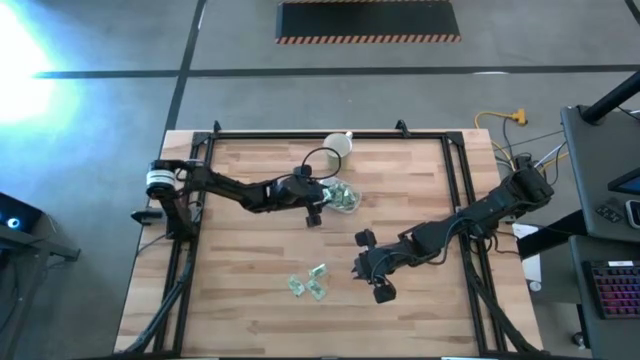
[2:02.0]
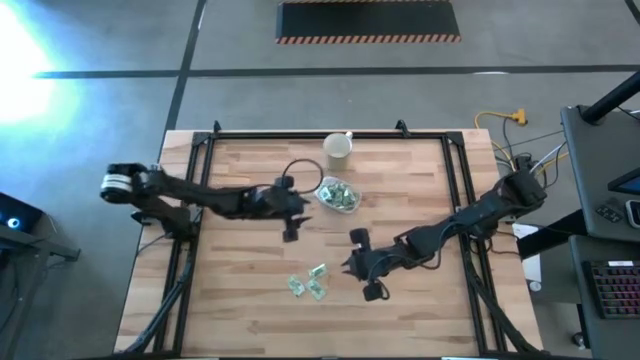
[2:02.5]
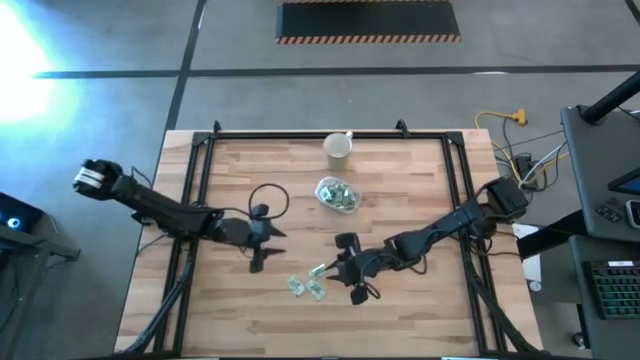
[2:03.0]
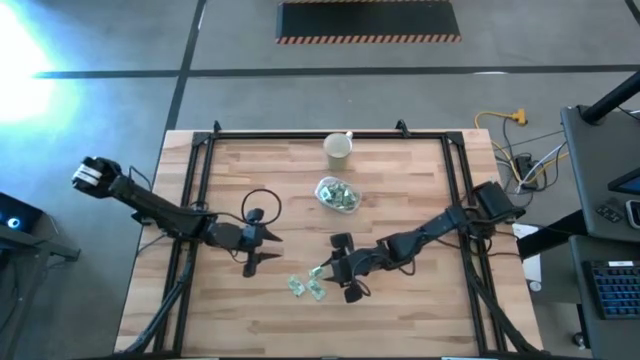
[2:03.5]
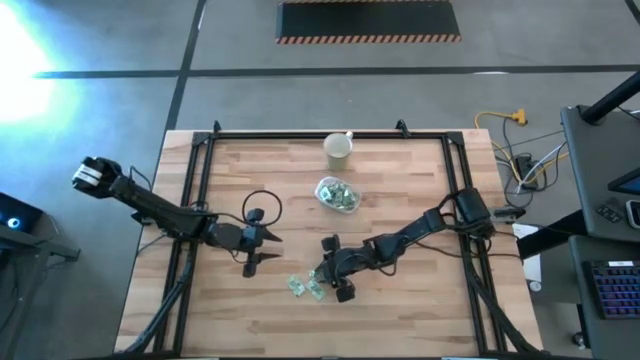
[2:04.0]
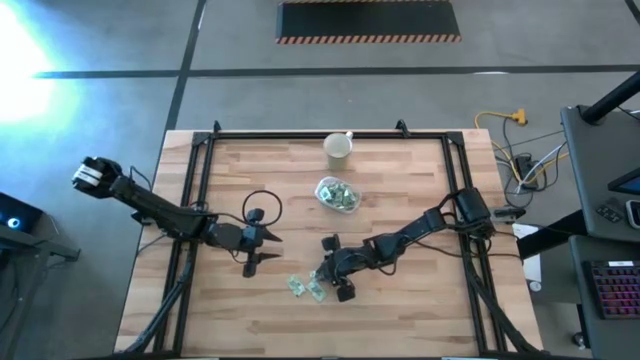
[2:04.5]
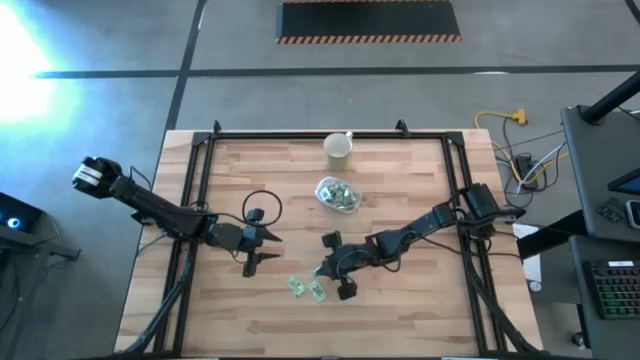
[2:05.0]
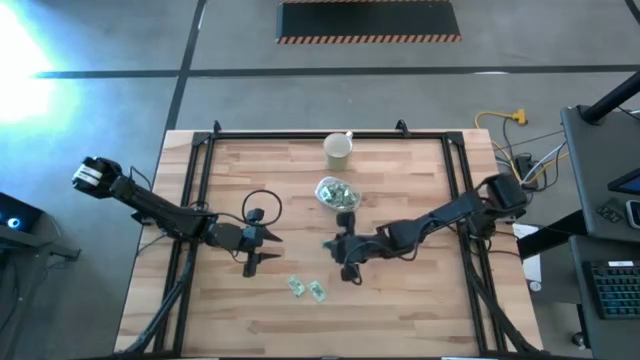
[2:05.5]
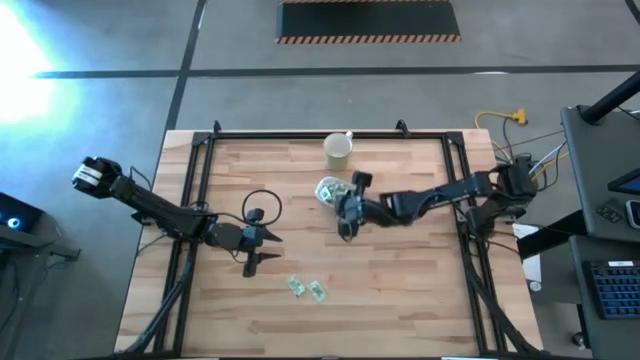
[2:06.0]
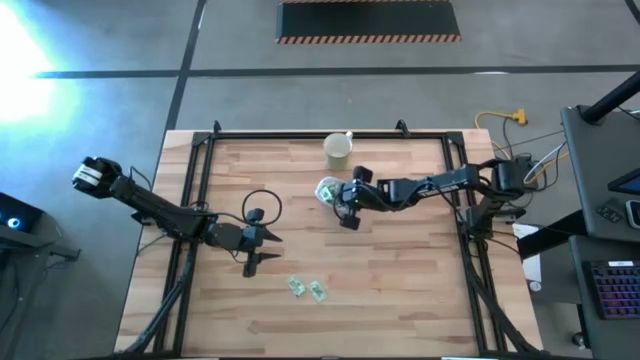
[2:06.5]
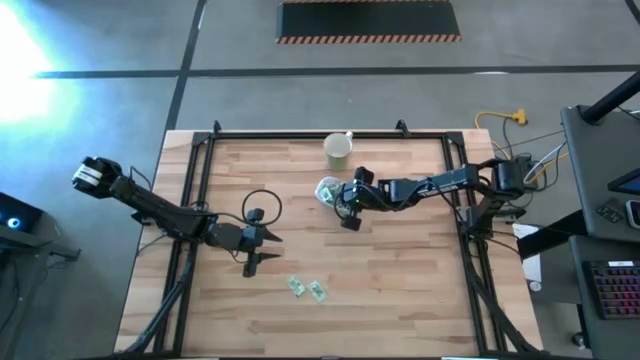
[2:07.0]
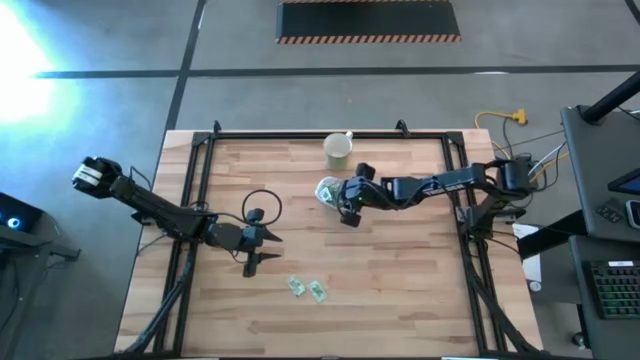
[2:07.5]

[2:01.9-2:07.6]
Task: Pick and place items into bin
Put the green stevia packet into the transparent bin

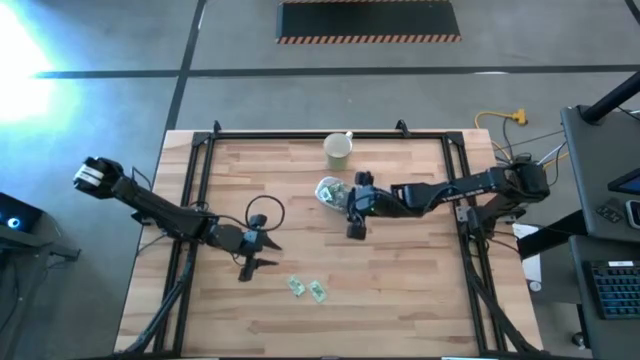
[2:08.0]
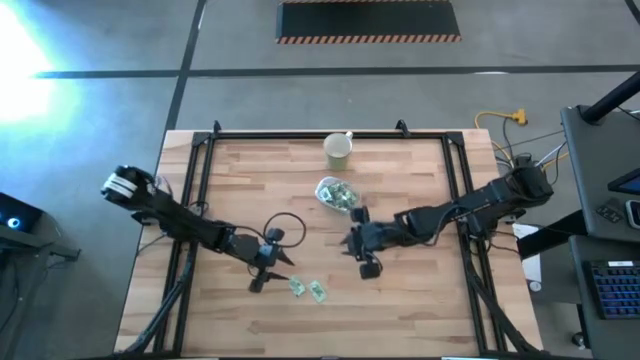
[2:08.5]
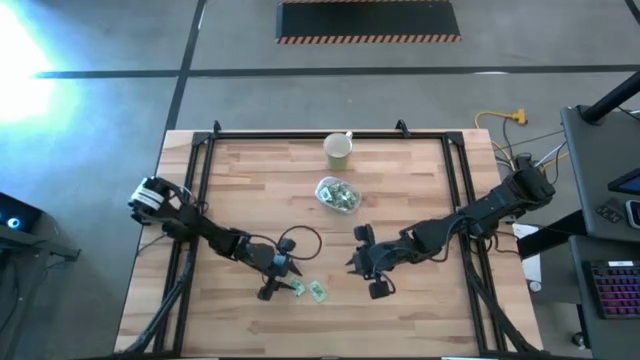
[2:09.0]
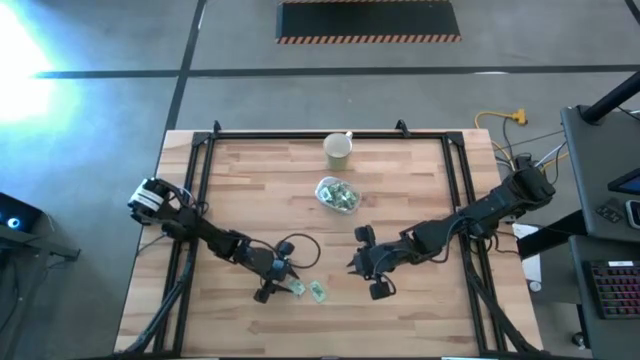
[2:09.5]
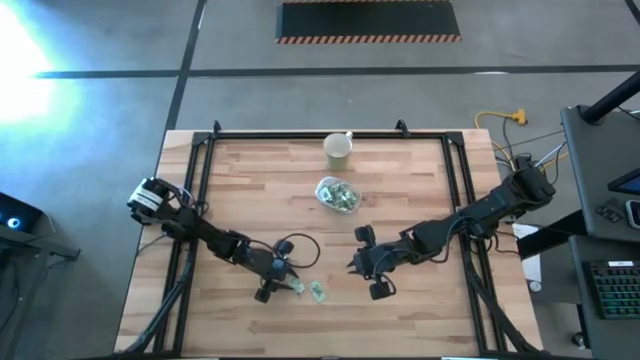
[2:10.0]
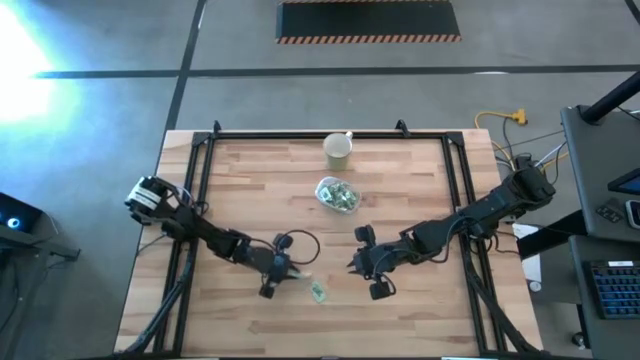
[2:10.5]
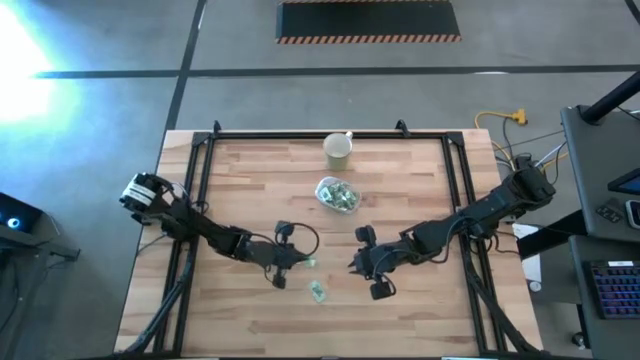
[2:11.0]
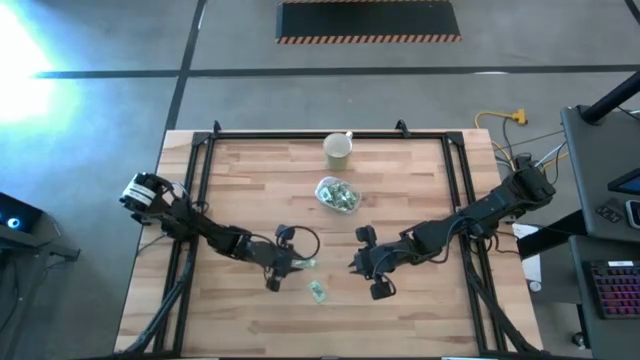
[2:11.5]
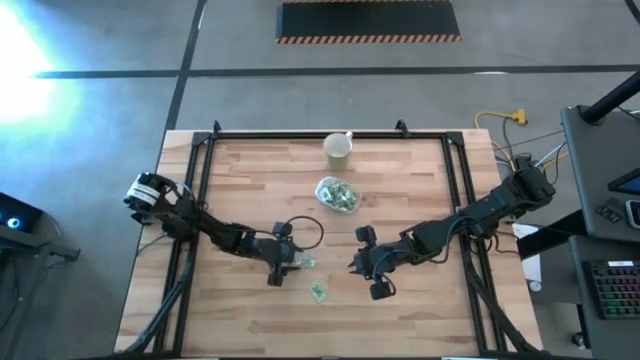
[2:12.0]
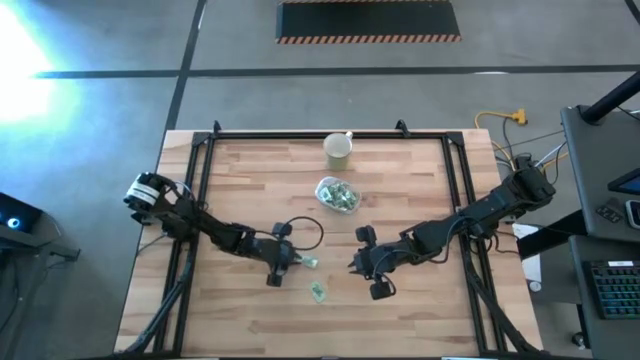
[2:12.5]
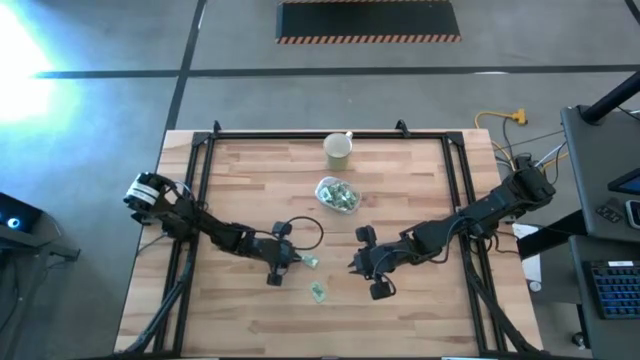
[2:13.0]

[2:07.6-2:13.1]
Put the green stevia packet into the transparent bin

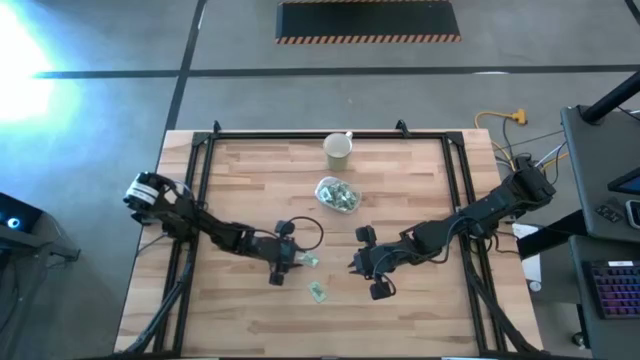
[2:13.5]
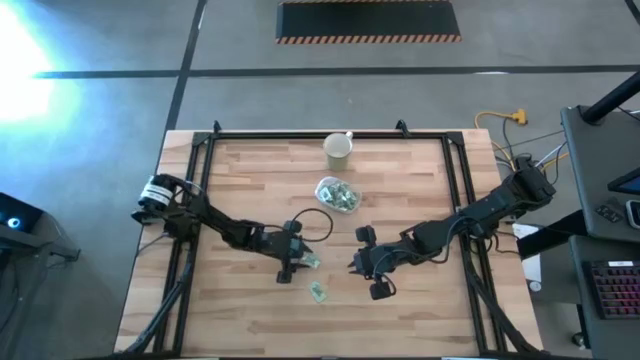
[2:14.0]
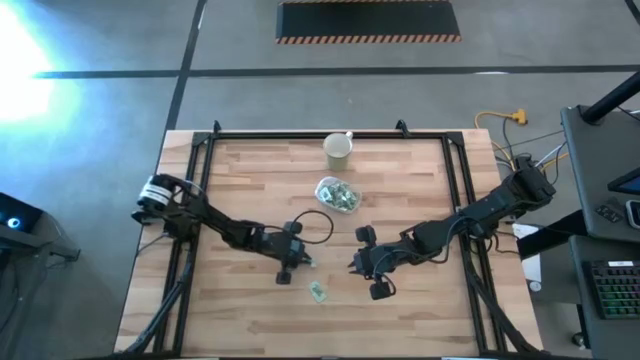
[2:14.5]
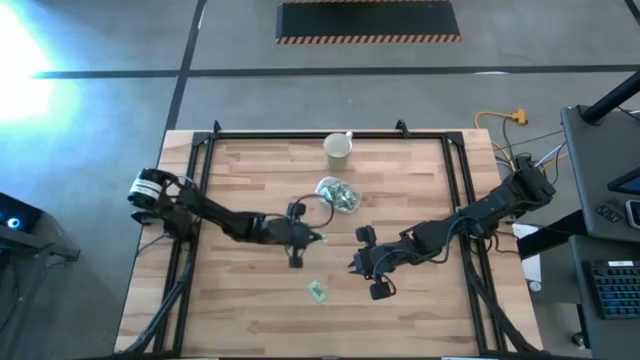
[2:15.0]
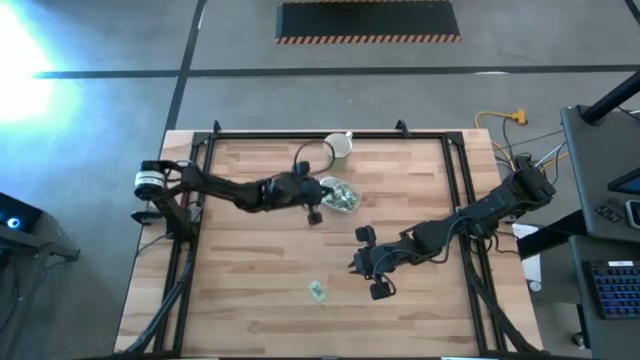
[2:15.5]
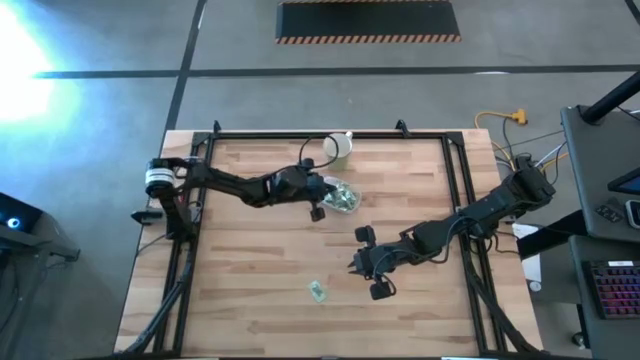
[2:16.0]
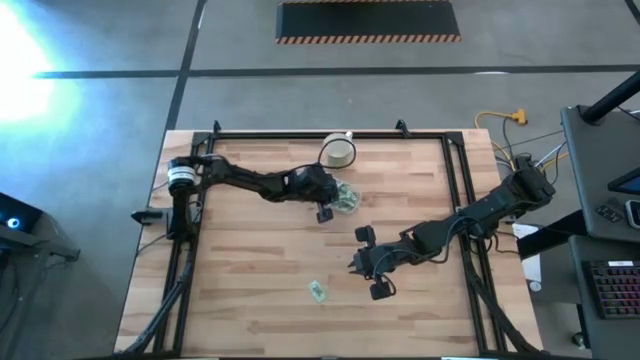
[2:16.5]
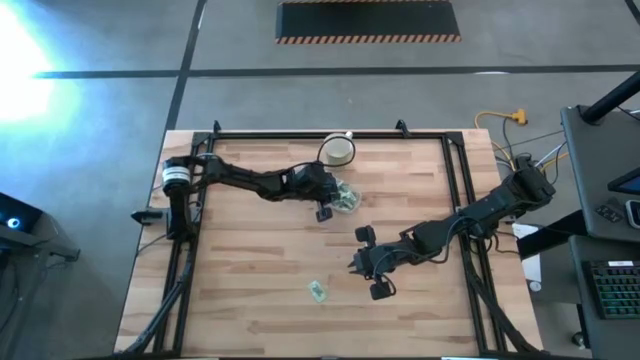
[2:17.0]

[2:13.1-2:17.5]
Put the green stevia packet into the transparent bin

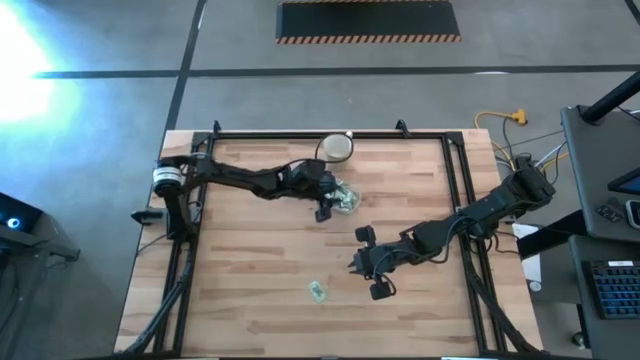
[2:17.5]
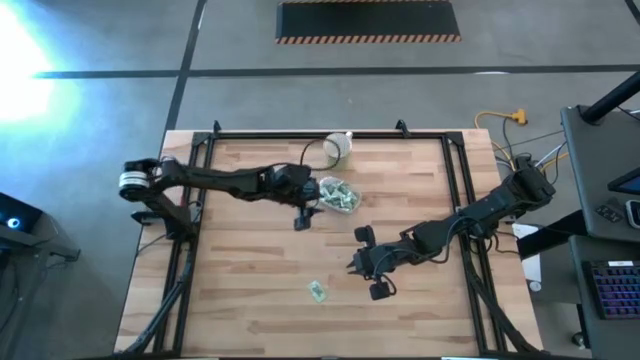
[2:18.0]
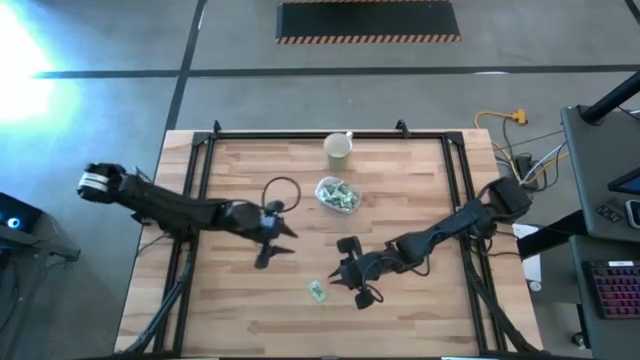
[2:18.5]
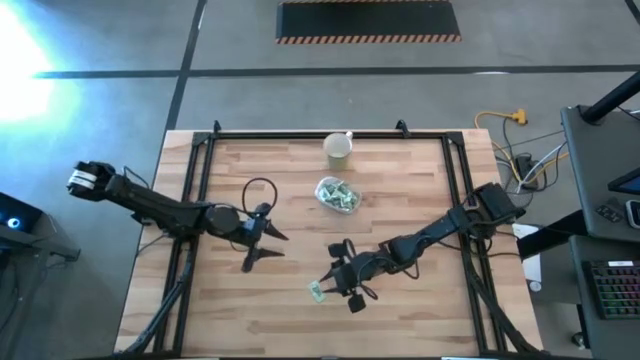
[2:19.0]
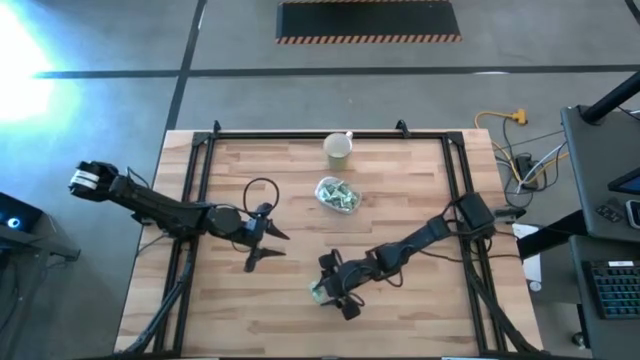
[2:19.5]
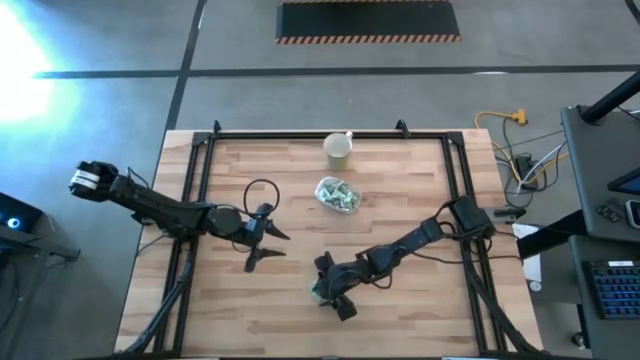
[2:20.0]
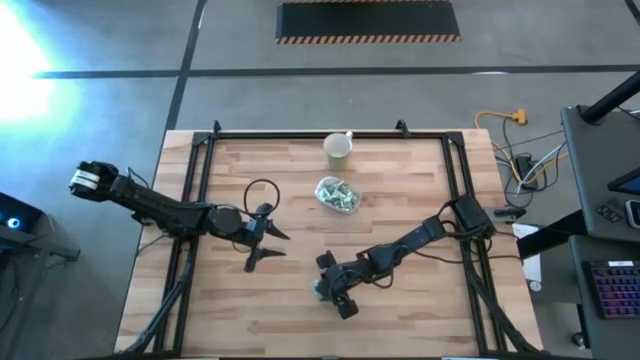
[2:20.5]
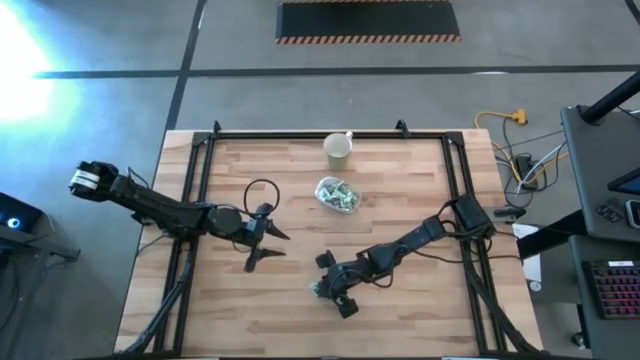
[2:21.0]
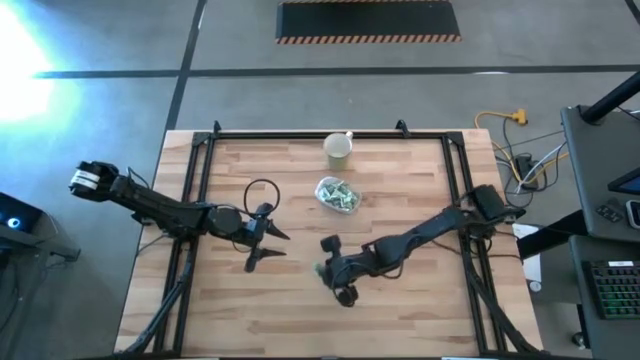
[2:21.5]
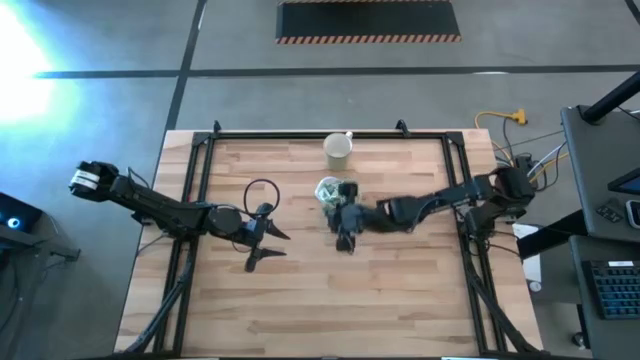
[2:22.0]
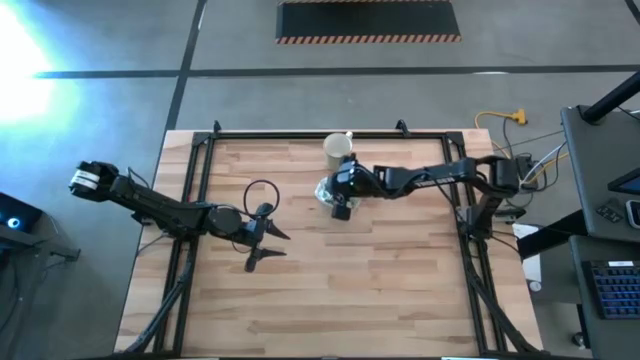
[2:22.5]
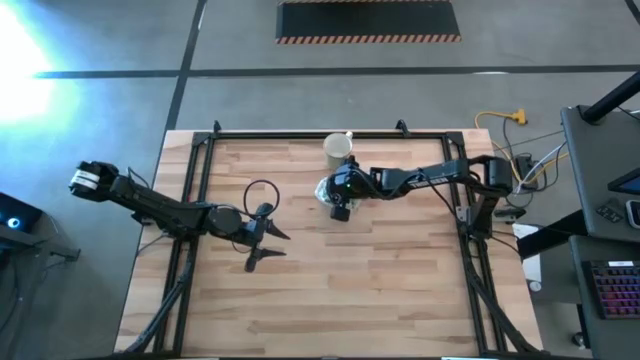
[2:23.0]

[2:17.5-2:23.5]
Put the green stevia packet into the transparent bin
